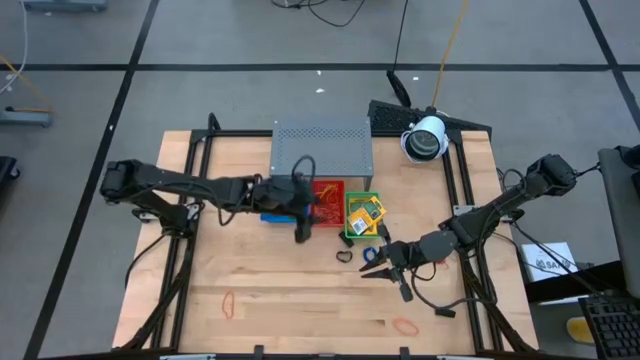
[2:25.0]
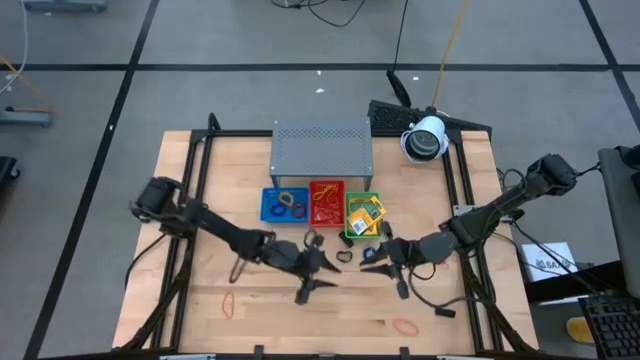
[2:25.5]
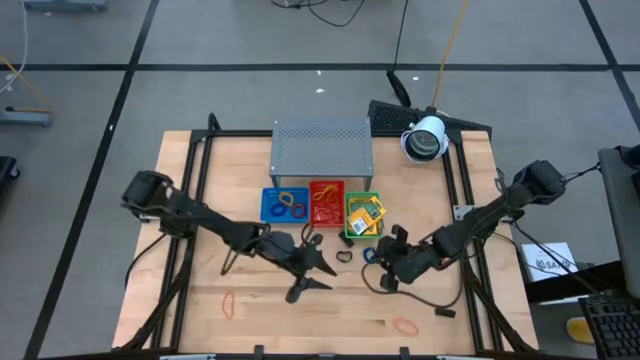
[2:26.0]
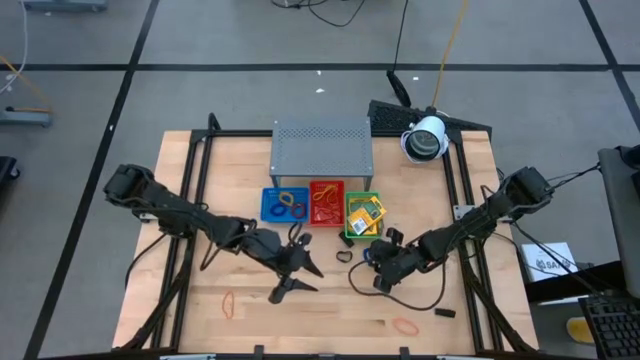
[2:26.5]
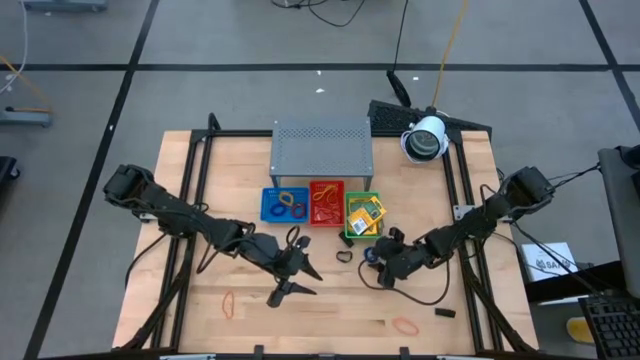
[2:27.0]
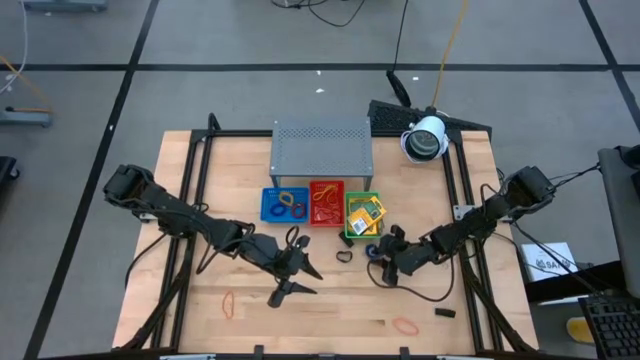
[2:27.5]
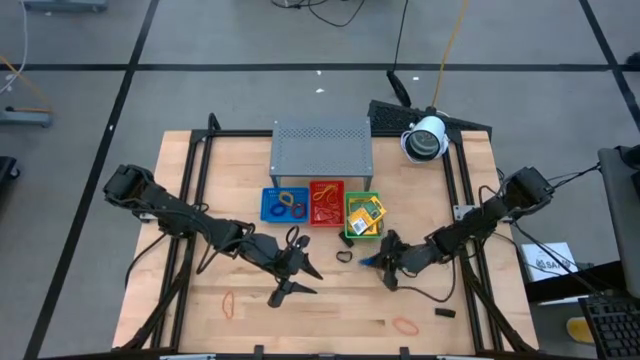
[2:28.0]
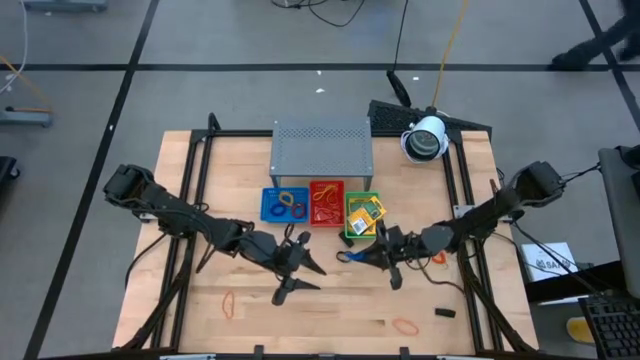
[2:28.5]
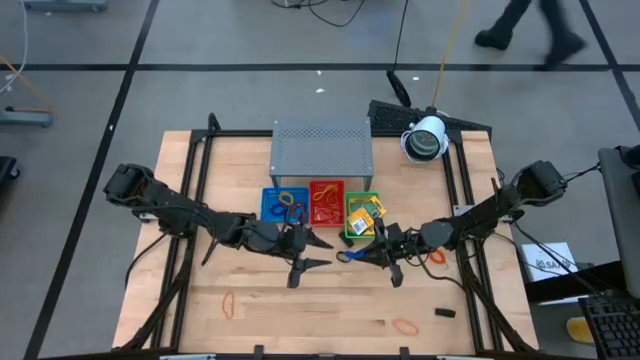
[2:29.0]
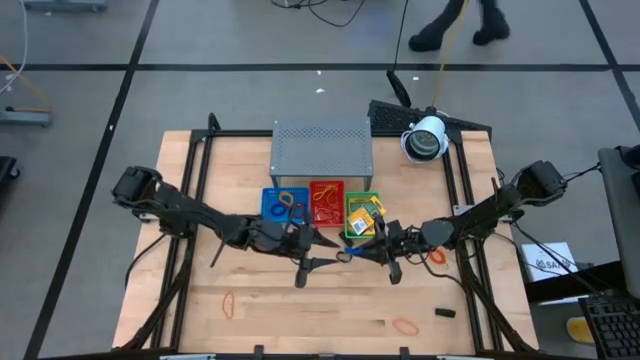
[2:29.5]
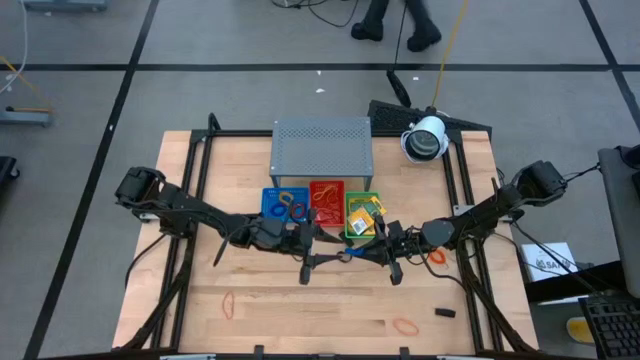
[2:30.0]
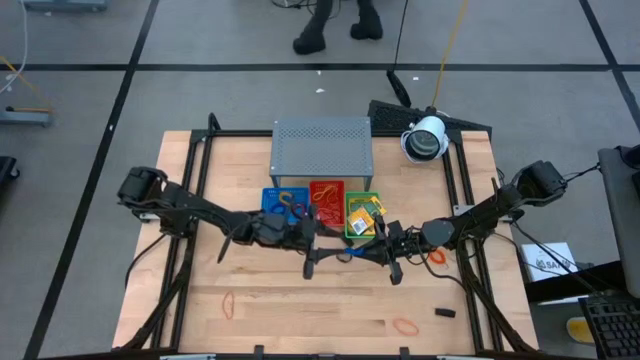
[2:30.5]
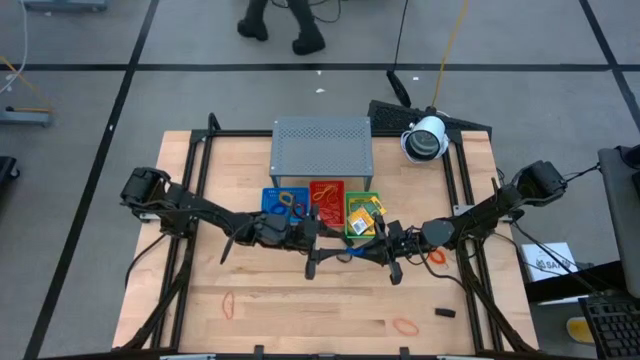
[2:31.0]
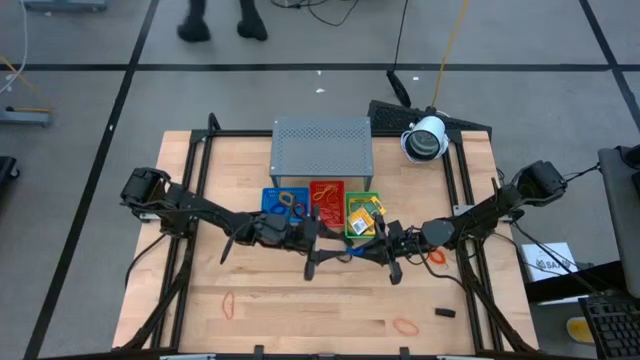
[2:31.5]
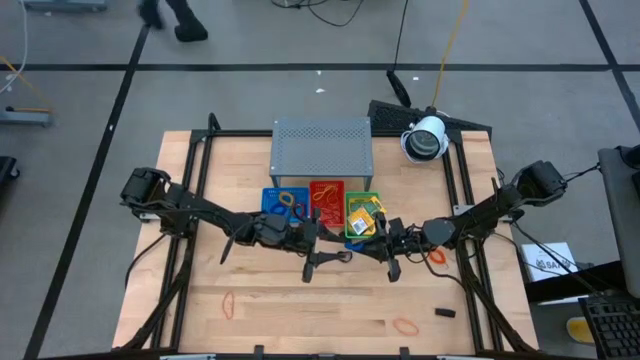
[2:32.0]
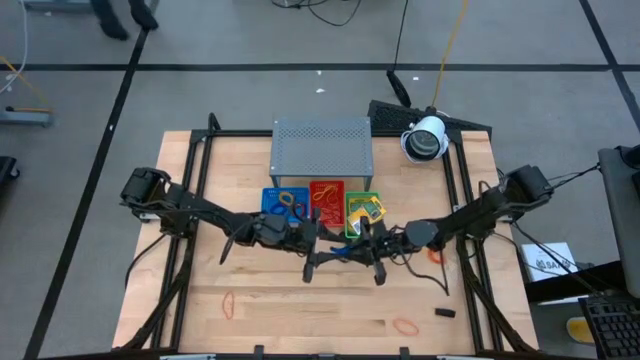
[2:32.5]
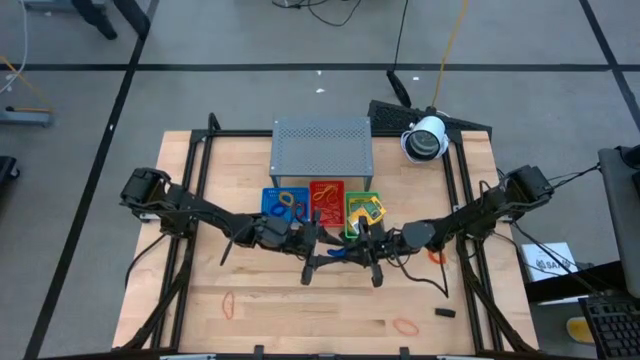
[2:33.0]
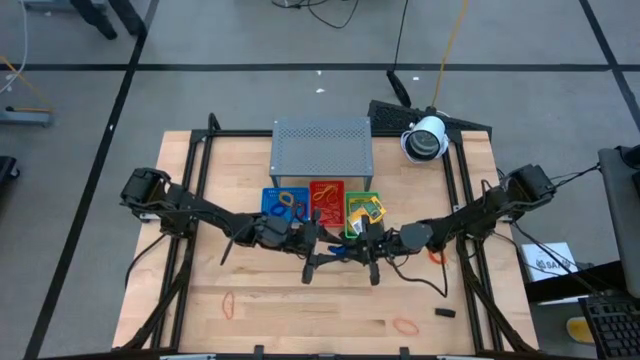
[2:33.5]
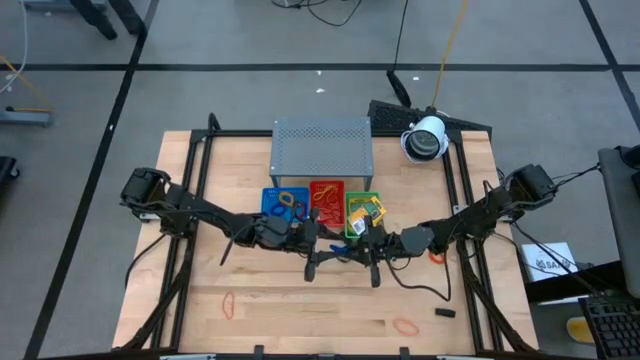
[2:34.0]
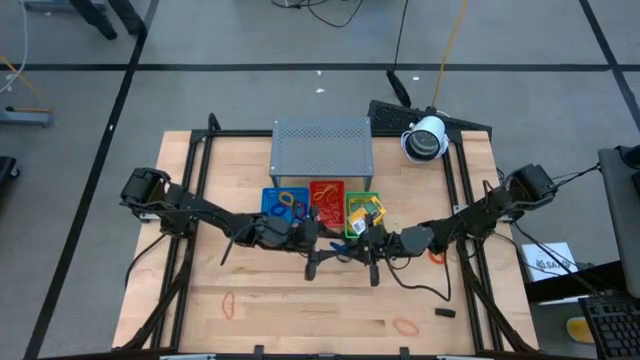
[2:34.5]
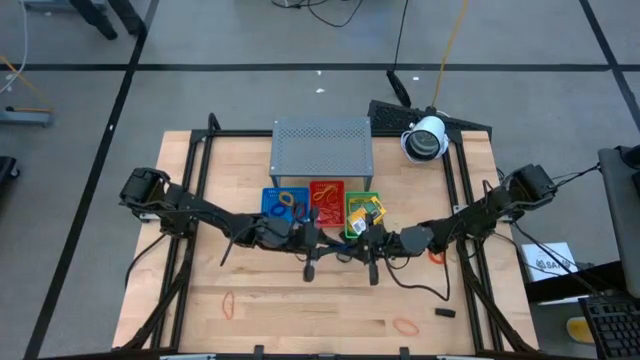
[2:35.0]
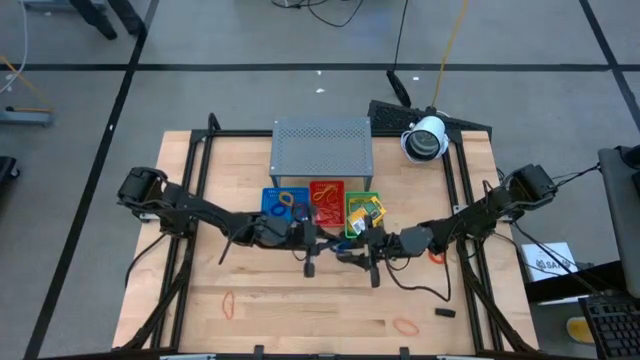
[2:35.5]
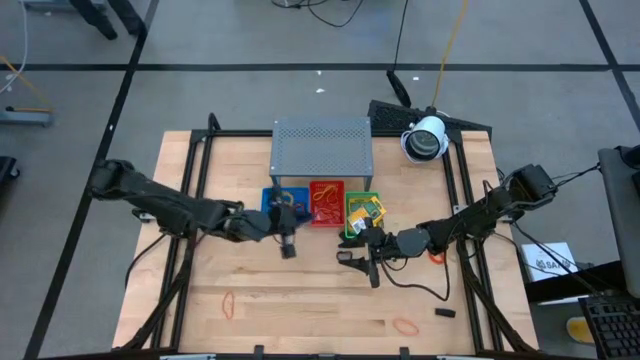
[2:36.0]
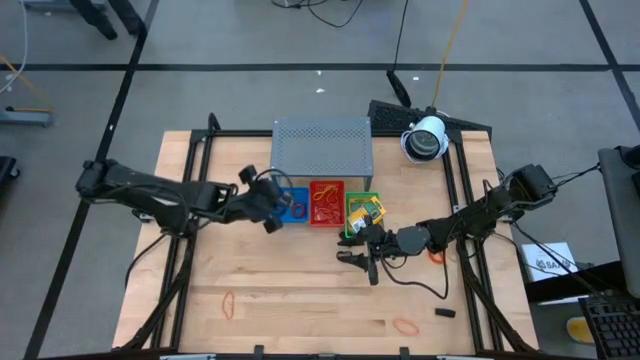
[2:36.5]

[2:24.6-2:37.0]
Task: Pick & Place Office Desk Supplies
Put the blue spring keychain into the blue bin

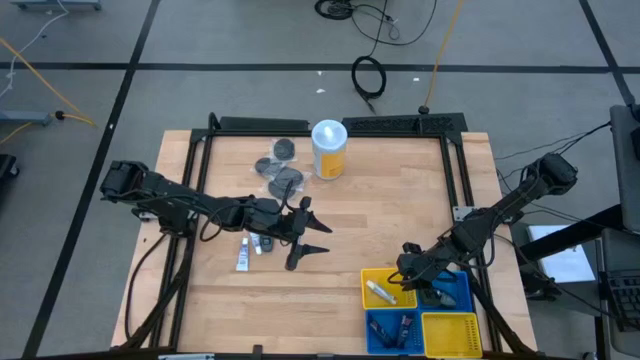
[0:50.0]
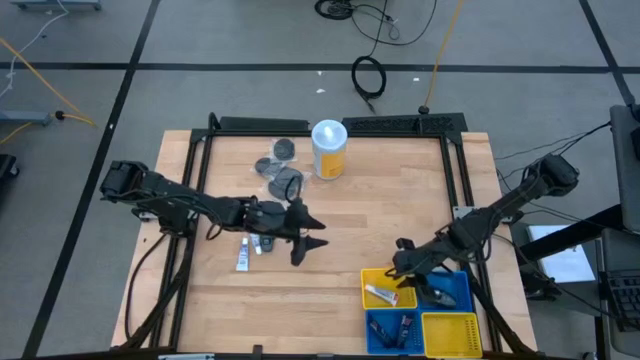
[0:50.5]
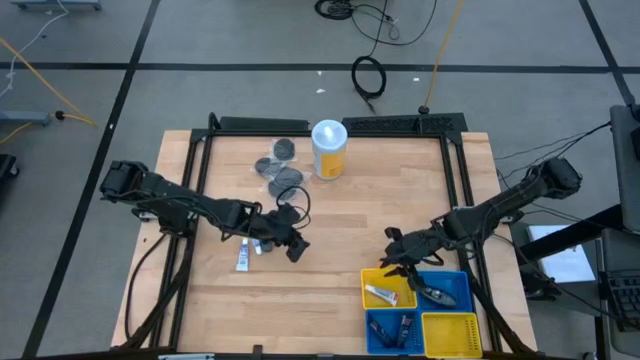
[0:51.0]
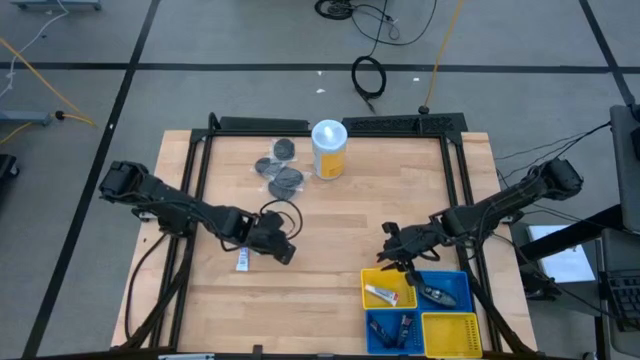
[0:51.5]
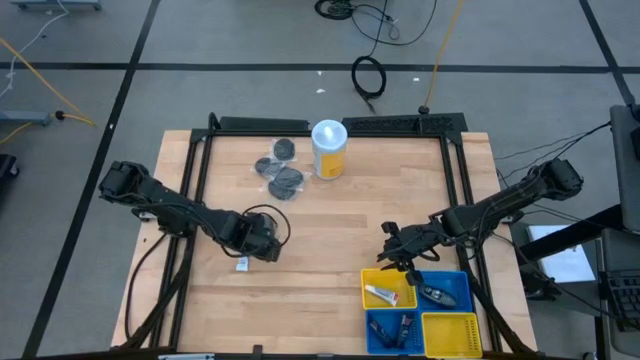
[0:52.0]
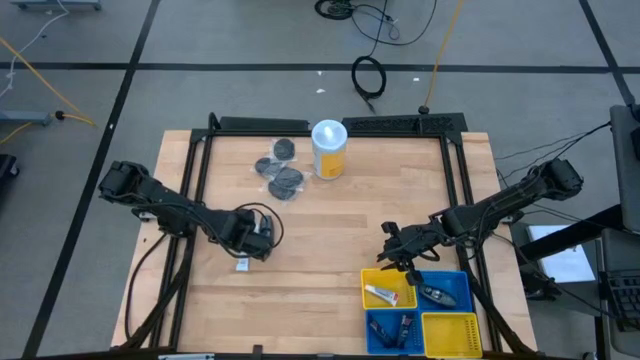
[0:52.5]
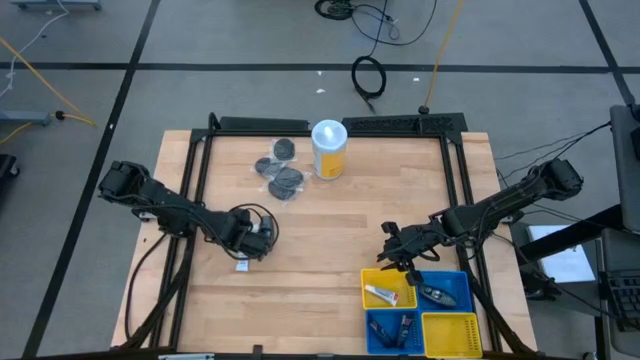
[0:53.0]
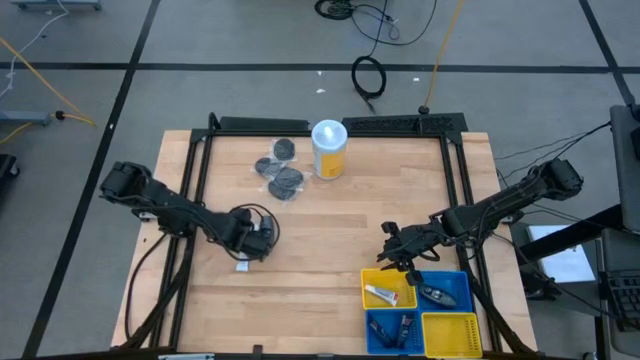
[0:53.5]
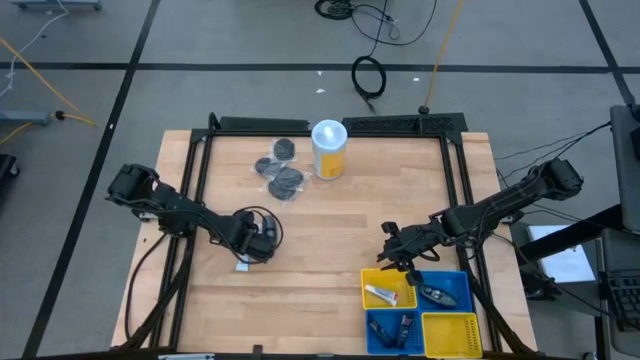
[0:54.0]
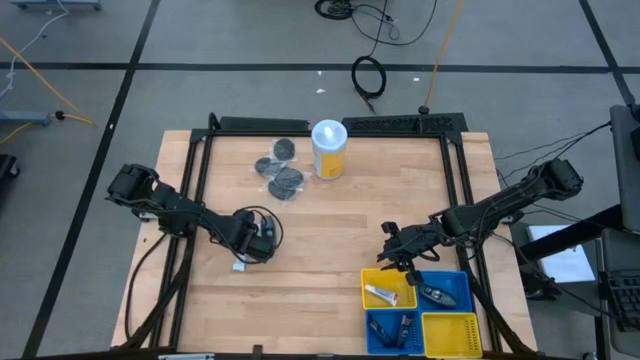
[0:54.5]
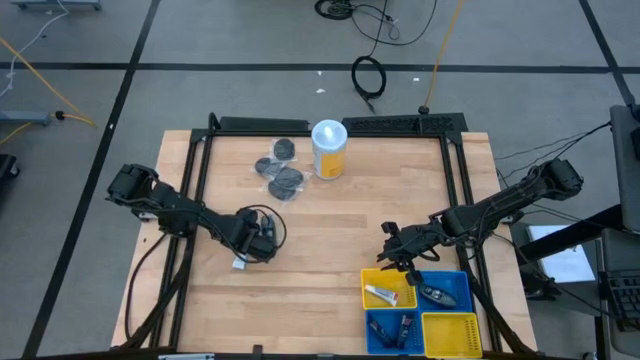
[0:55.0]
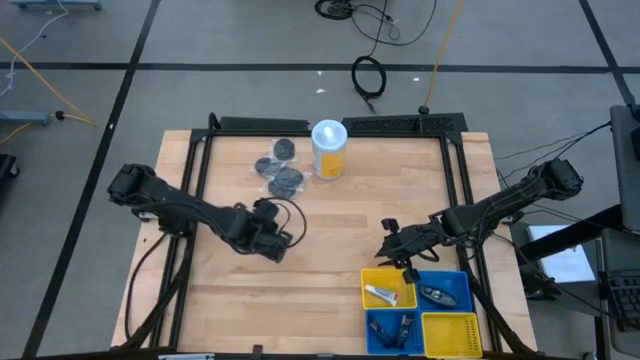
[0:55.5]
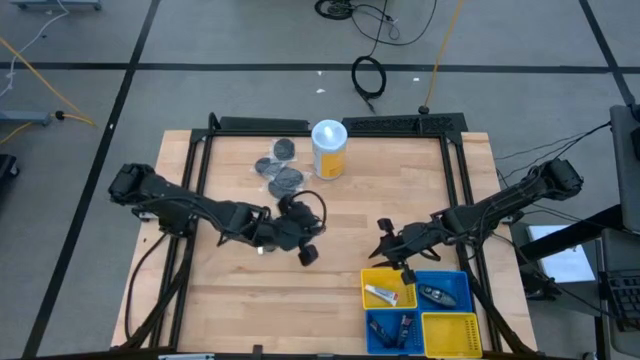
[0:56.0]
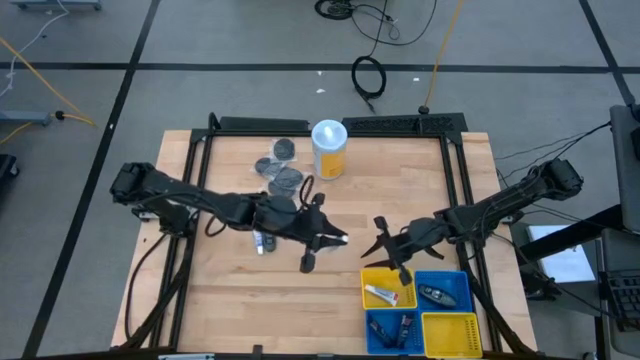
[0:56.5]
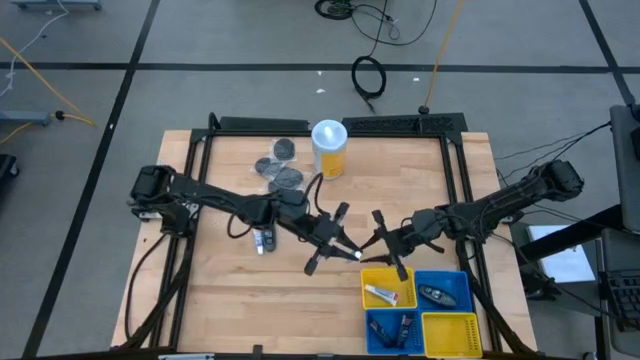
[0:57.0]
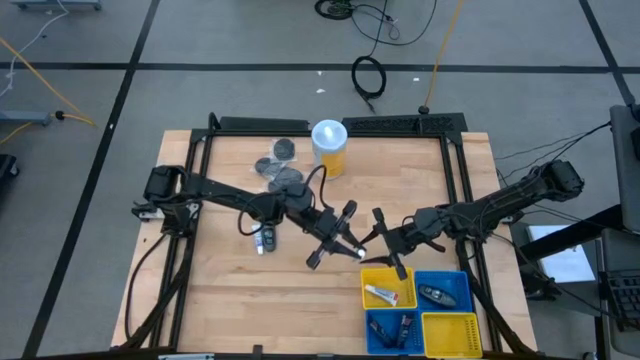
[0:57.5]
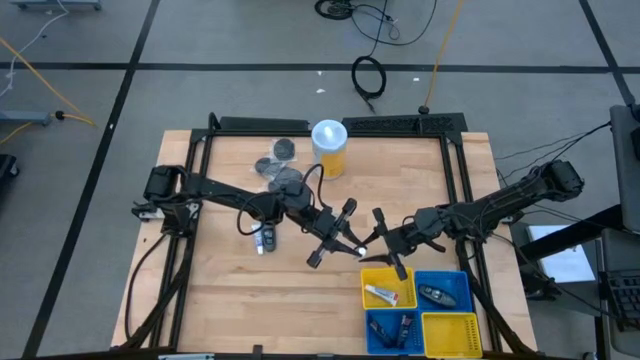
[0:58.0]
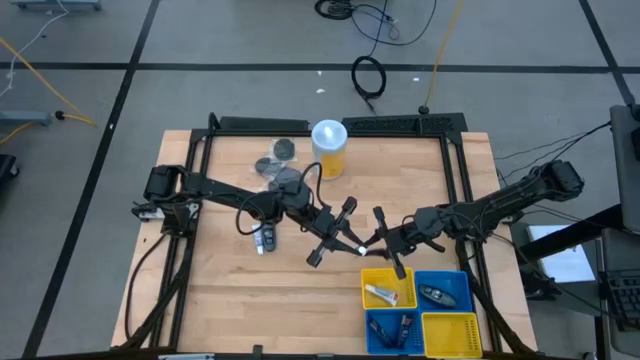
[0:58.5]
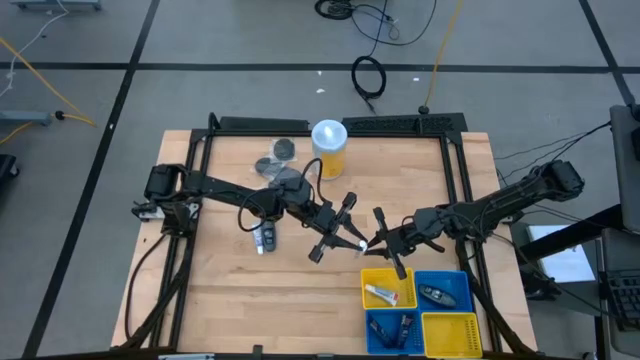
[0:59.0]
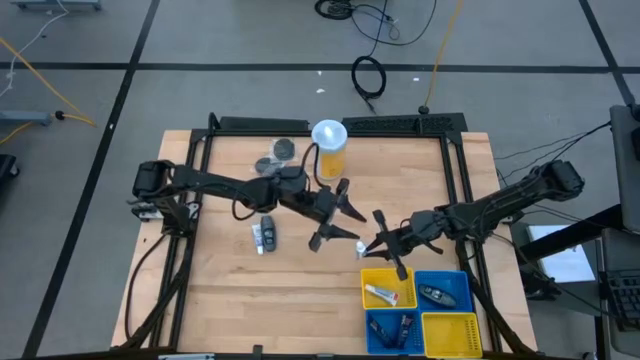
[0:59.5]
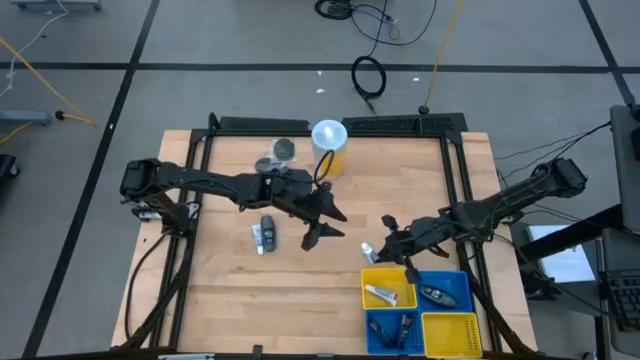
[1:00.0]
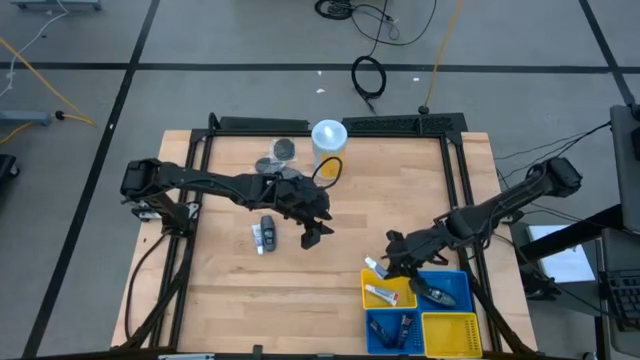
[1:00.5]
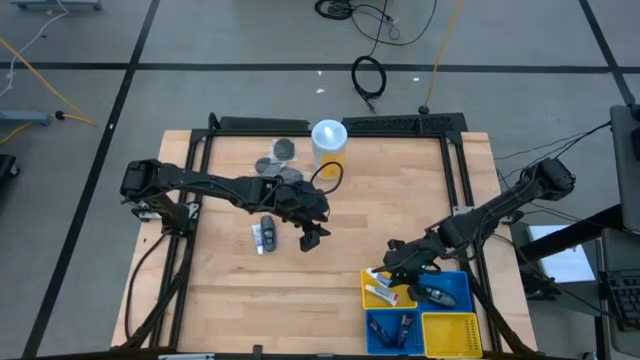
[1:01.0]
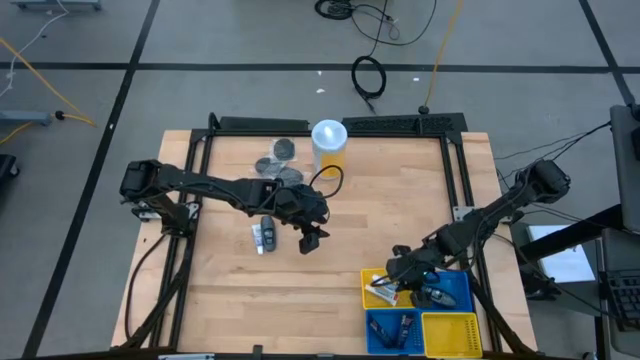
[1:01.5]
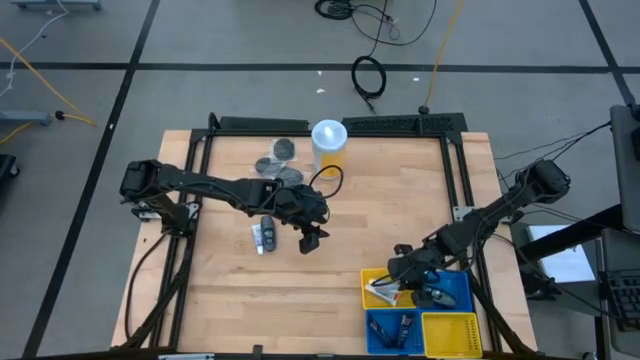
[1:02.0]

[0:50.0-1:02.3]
Task: Pick & Place Travel size toiletries
Put the toothpaste into the top yellow basket
